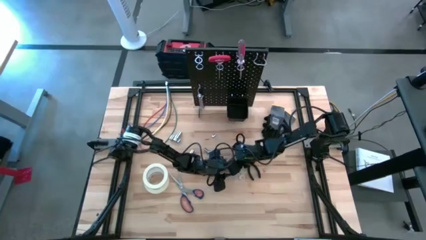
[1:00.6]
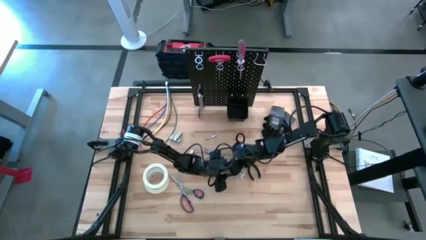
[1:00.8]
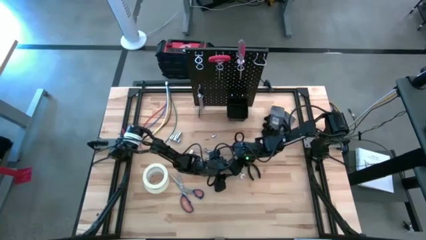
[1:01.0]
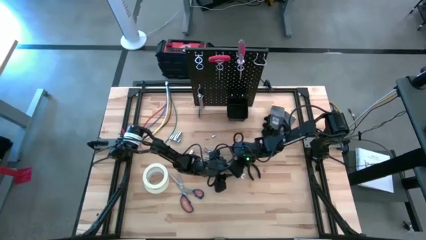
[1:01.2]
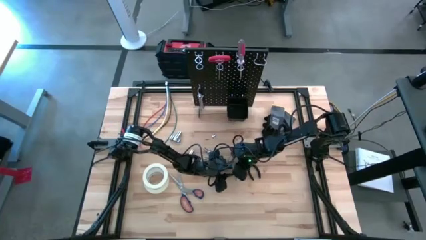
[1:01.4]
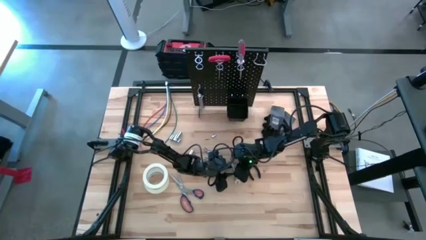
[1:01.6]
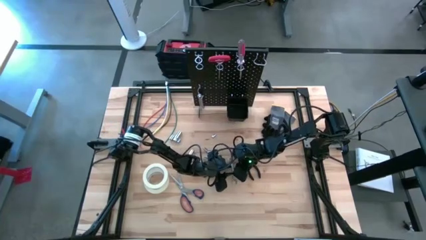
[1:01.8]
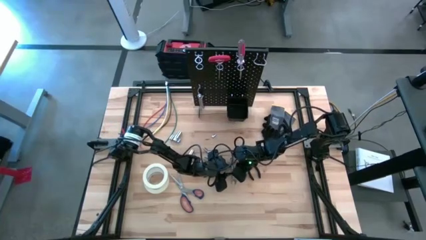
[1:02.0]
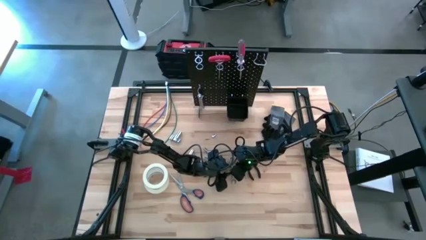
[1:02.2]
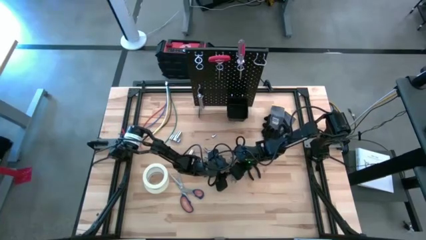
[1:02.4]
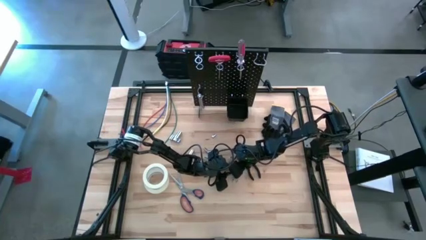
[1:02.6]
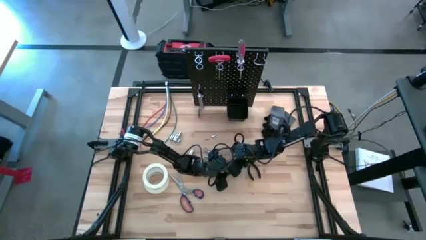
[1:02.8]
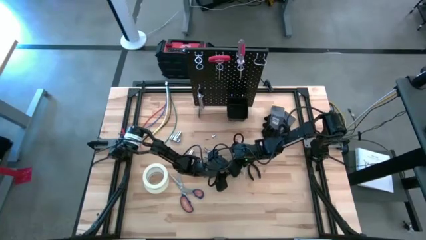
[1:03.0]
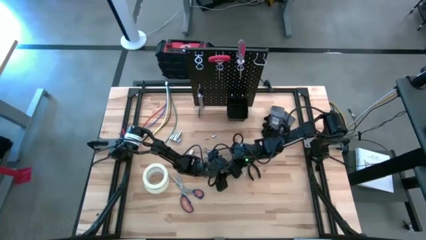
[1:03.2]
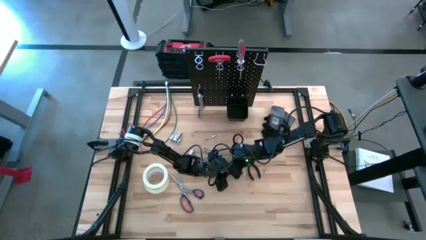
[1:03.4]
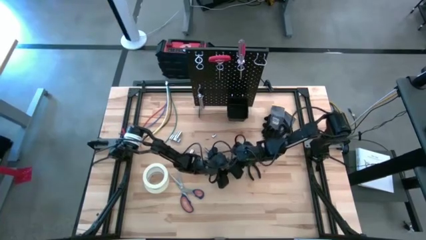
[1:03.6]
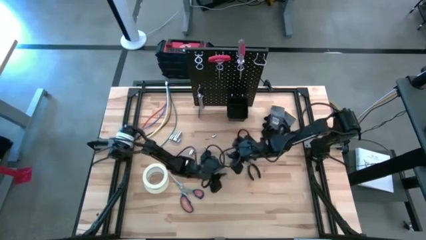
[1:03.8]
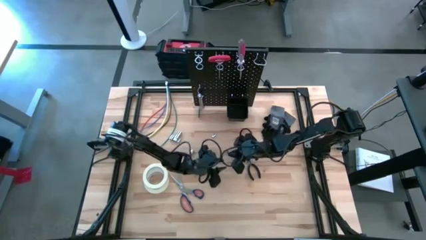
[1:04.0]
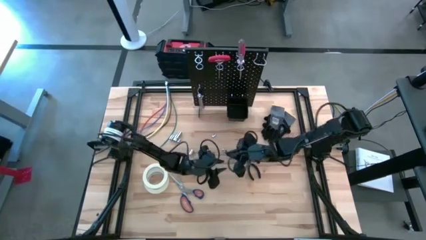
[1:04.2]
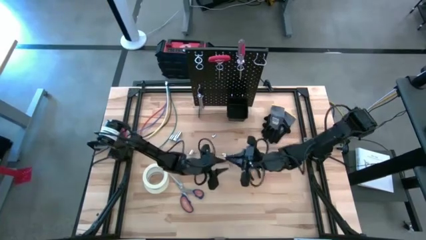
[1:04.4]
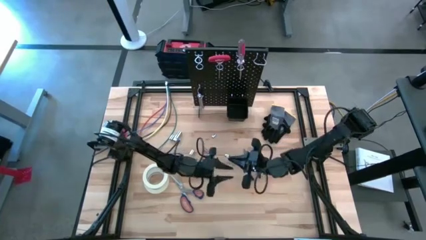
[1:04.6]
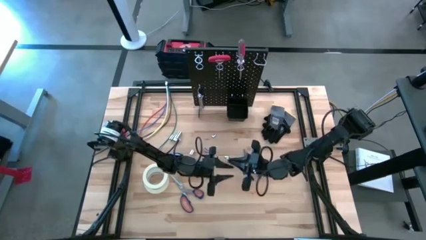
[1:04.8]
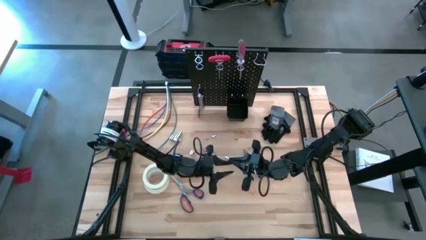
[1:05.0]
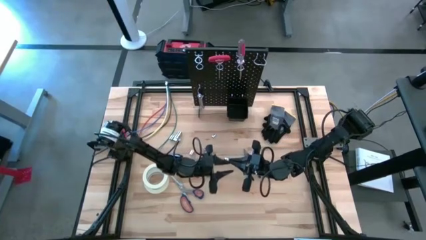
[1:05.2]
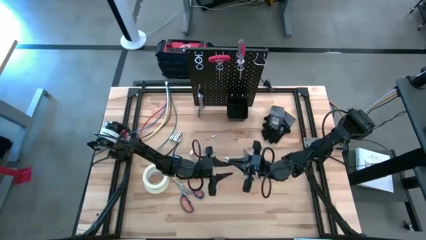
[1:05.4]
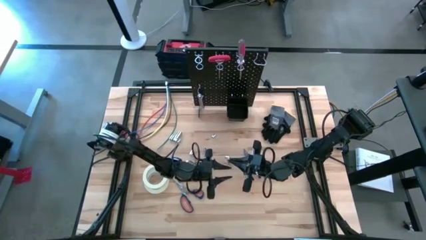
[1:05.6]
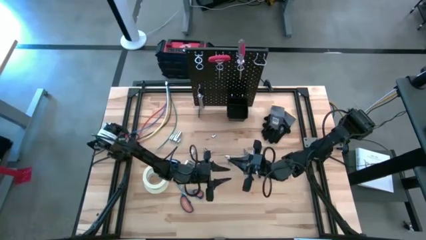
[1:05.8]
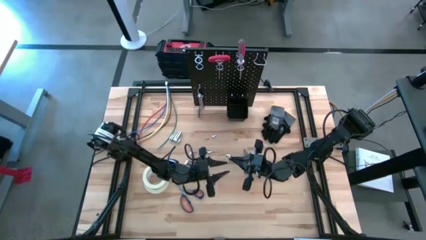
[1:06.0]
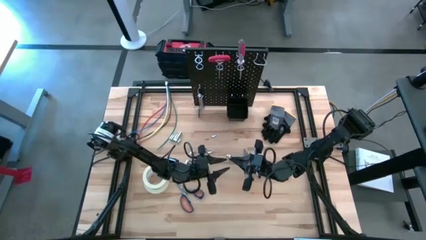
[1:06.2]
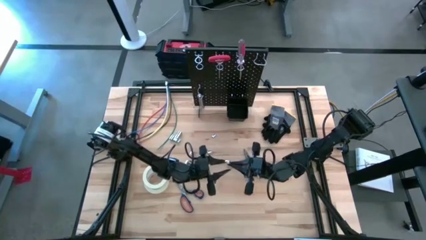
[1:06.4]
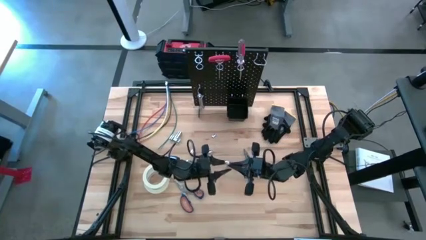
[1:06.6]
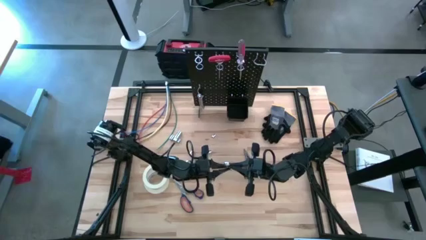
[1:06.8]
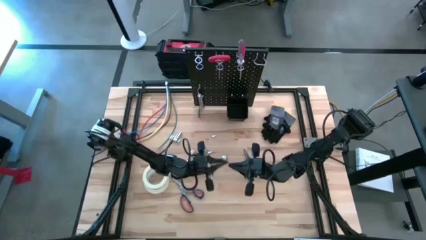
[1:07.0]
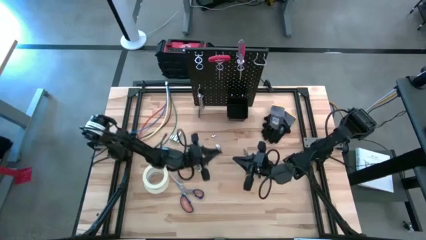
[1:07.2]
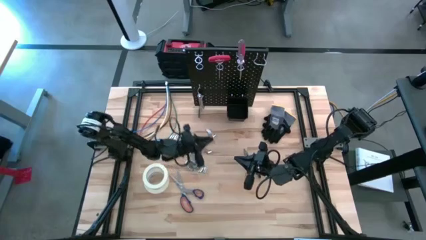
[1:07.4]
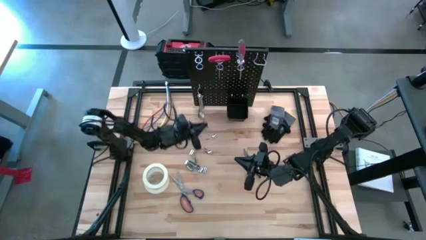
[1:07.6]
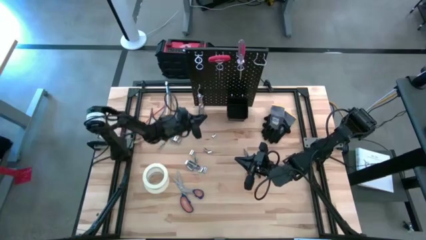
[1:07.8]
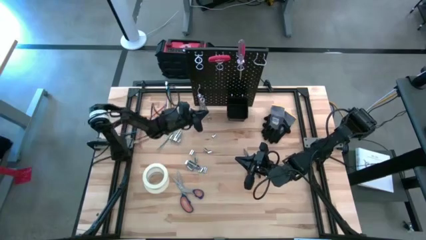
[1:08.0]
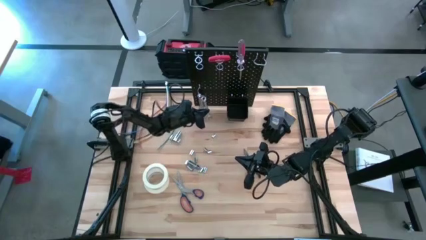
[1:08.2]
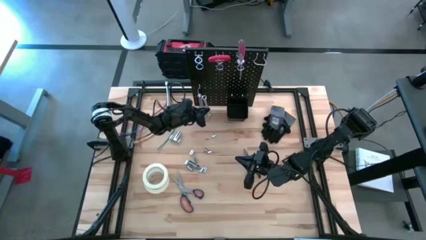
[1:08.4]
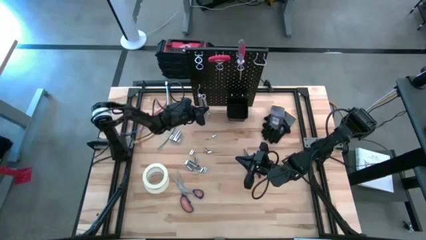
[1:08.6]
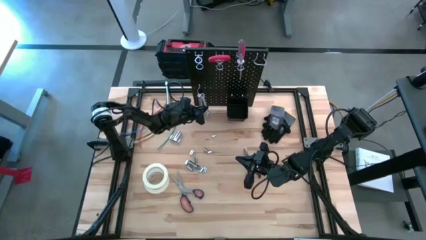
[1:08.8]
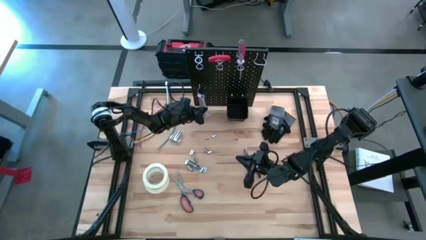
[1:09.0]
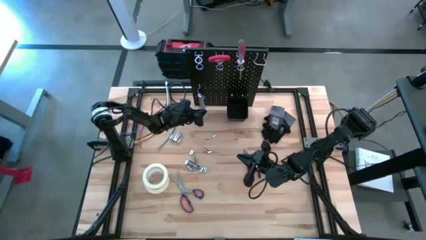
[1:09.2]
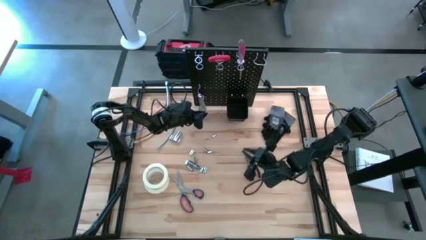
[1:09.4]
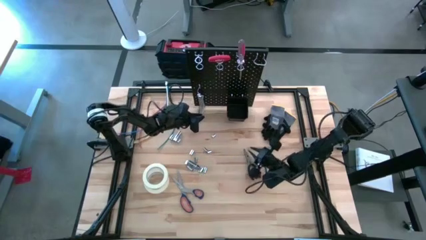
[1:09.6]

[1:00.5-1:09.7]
Task: Hang tools onto peg board
Hang the wrench on the peg board

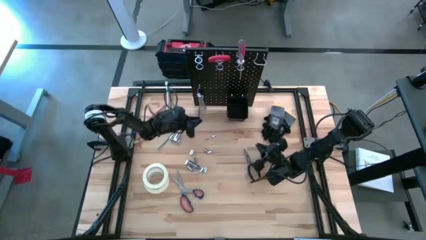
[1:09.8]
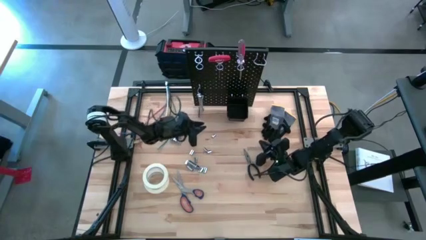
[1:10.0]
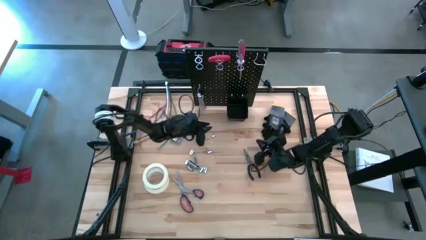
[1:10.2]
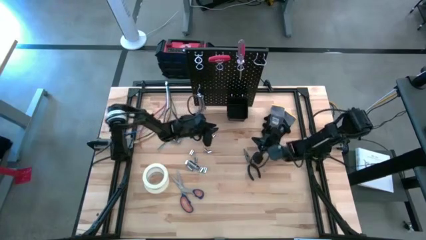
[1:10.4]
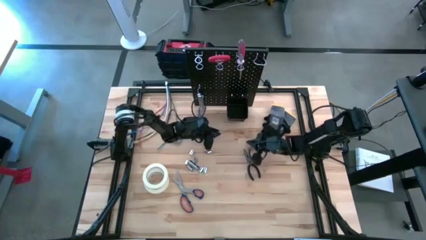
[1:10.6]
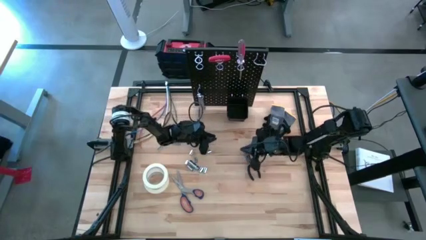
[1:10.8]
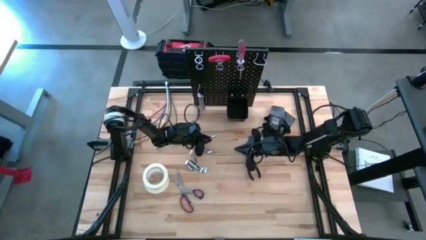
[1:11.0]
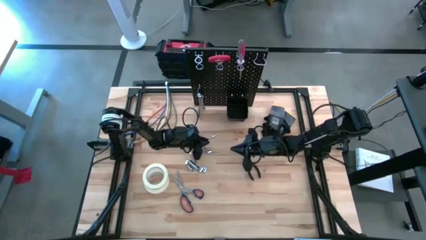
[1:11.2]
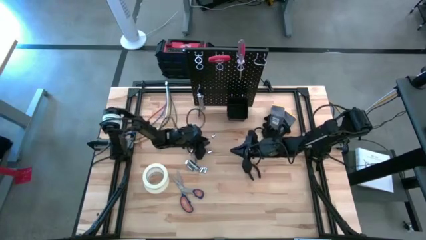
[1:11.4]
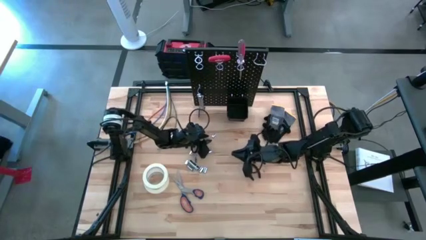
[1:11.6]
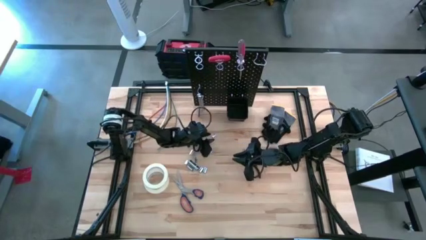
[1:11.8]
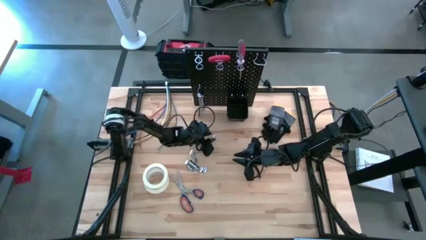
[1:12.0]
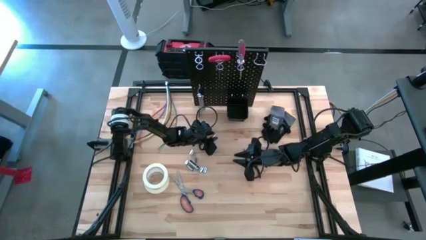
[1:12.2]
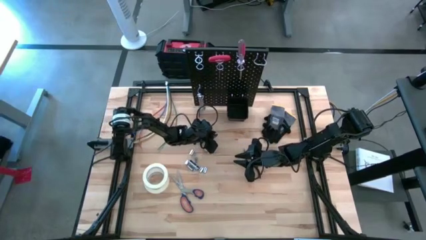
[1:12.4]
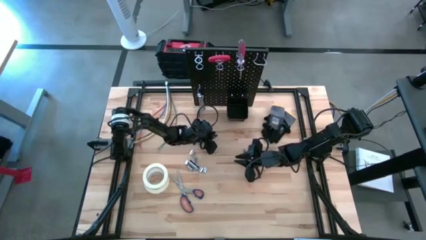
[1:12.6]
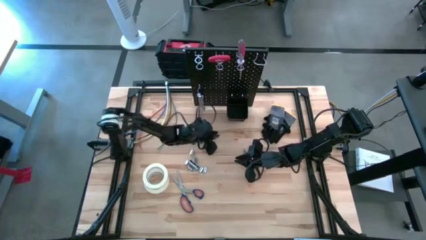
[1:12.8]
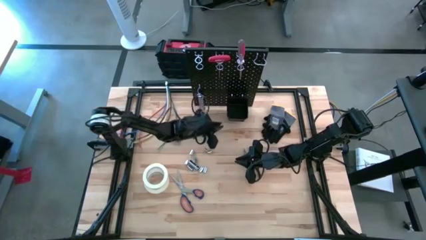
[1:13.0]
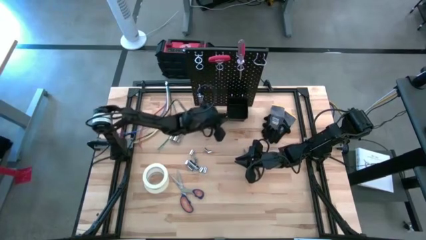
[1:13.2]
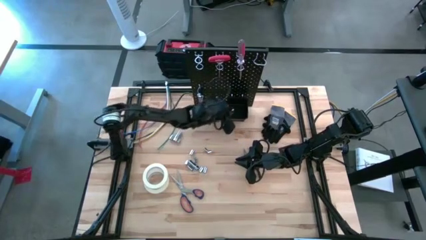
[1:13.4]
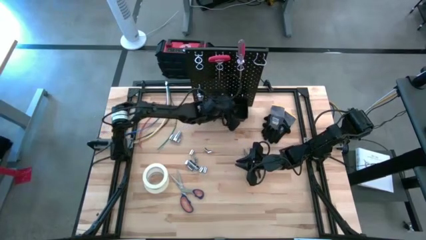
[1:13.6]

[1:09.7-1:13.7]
Put the socket into the black bin on the peg board

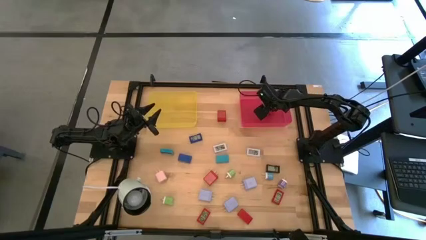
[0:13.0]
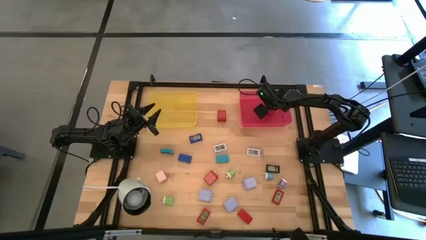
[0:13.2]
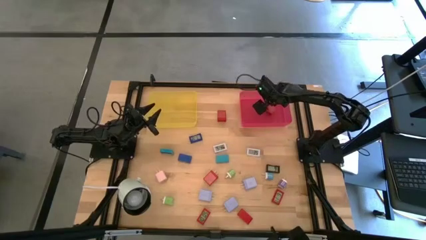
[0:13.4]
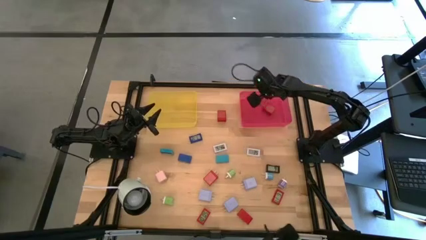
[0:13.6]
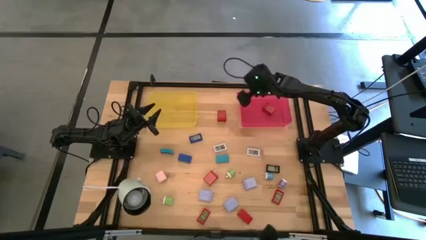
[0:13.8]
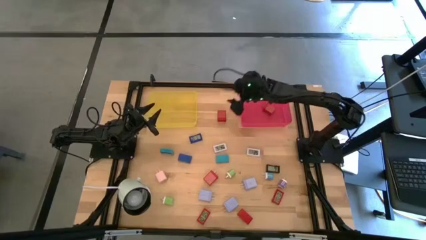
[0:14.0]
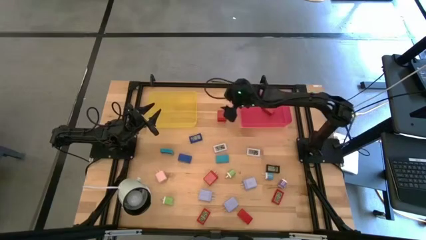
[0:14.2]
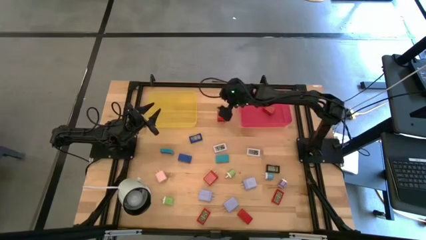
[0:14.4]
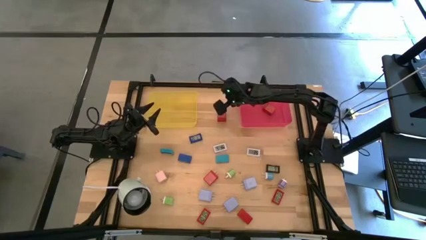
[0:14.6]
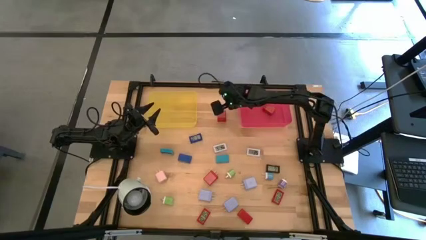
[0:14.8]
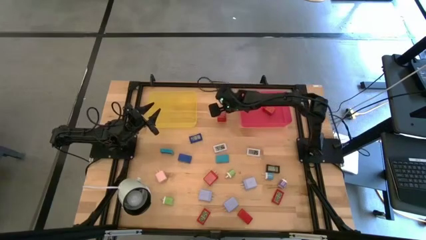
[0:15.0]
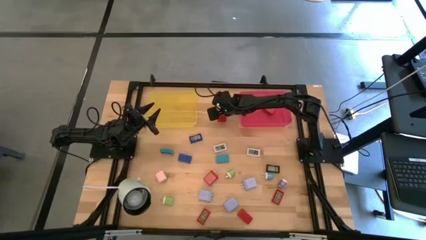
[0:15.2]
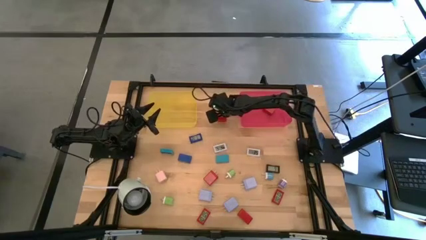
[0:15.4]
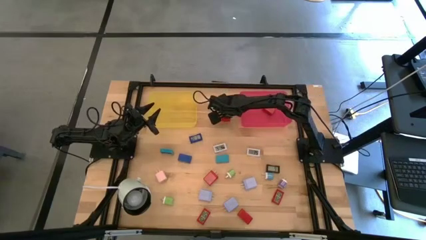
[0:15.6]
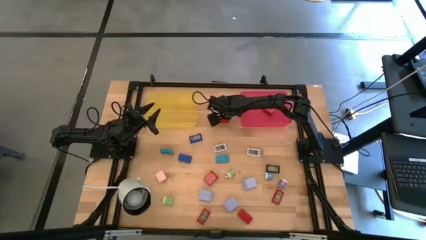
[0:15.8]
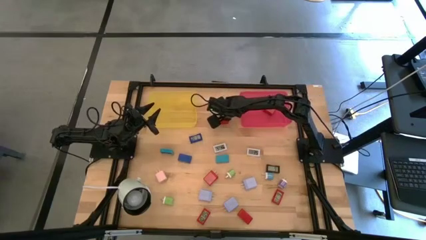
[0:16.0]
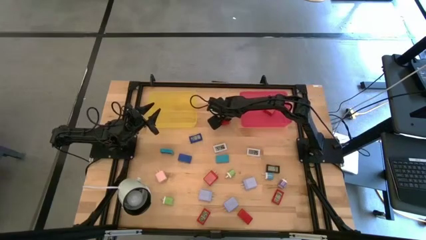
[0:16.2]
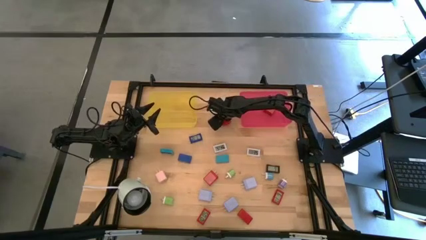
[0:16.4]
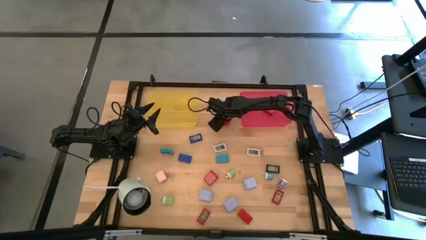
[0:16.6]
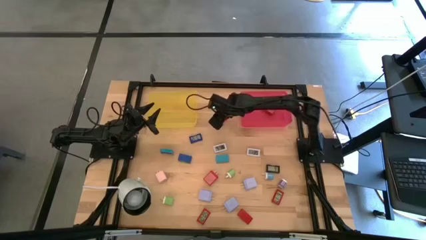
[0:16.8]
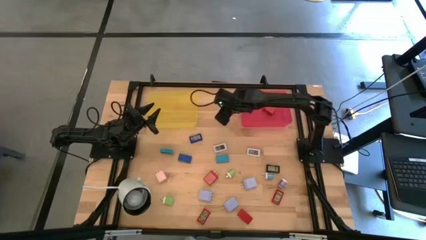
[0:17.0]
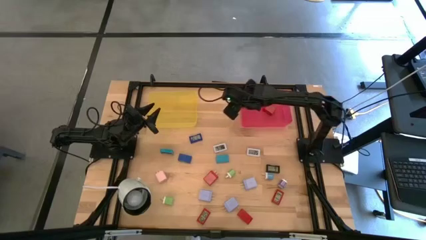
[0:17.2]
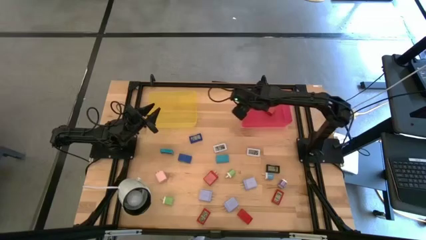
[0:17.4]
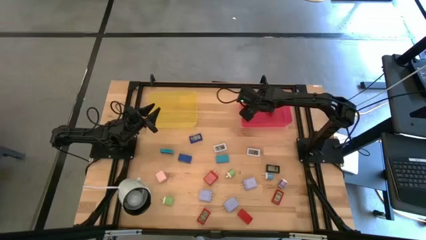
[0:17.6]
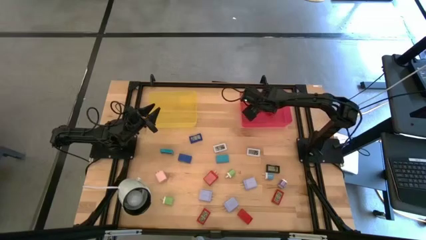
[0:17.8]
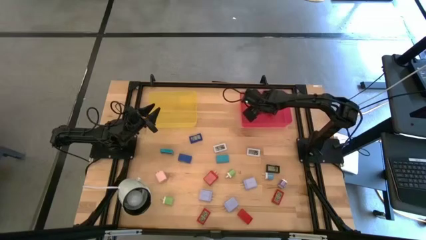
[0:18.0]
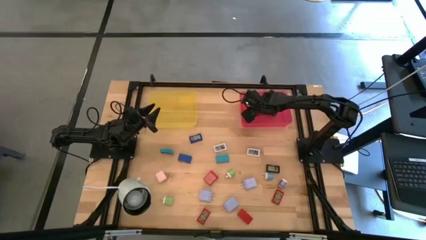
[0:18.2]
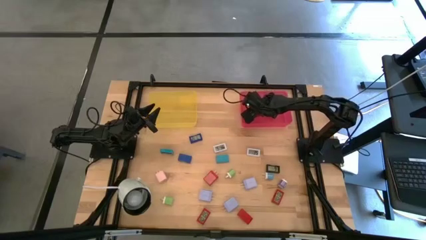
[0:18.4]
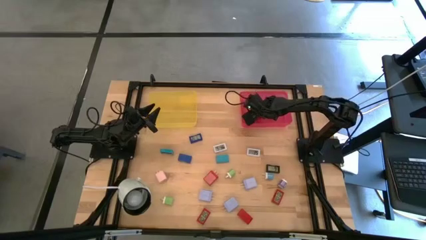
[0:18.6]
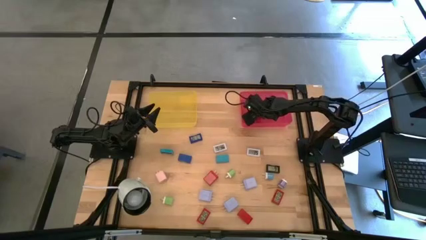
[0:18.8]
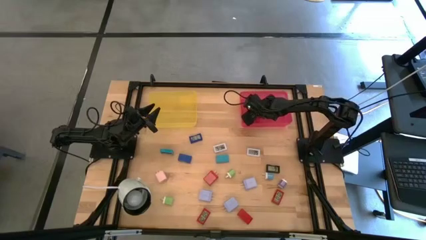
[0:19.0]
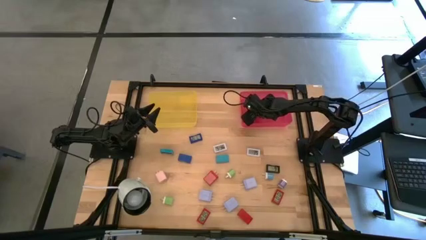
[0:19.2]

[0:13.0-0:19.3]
Task: Pick & Place Office items
Put the top red charger adapter into the red bin
